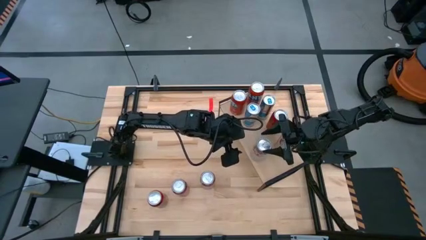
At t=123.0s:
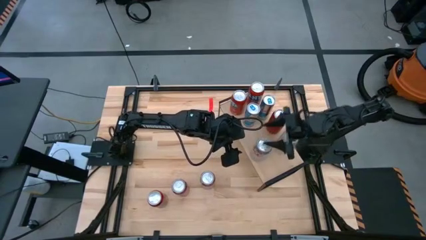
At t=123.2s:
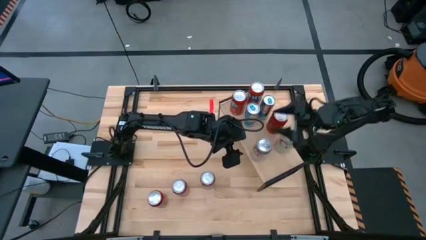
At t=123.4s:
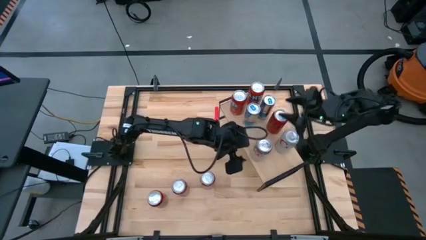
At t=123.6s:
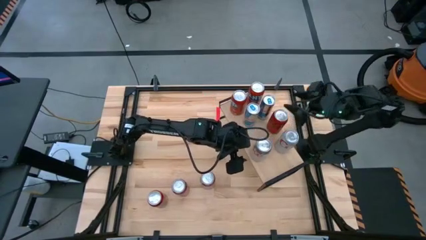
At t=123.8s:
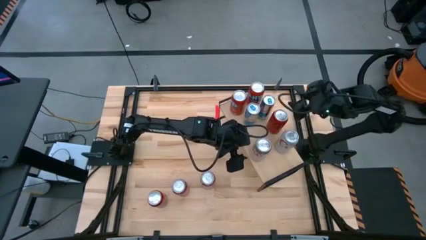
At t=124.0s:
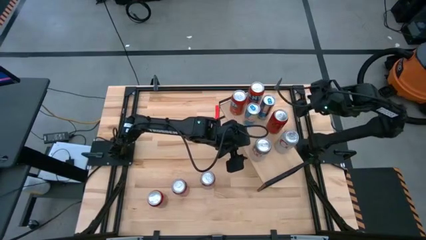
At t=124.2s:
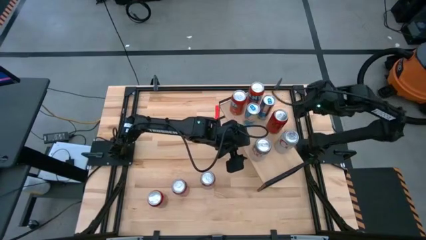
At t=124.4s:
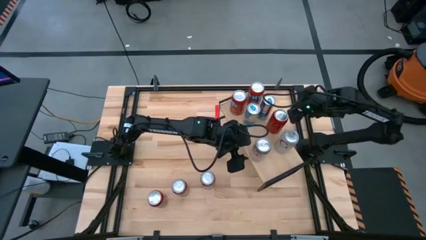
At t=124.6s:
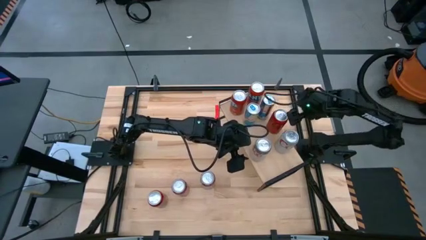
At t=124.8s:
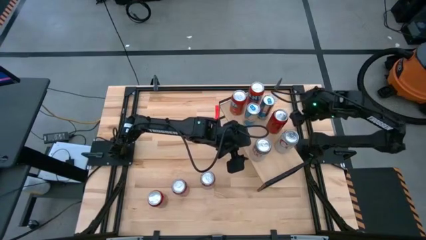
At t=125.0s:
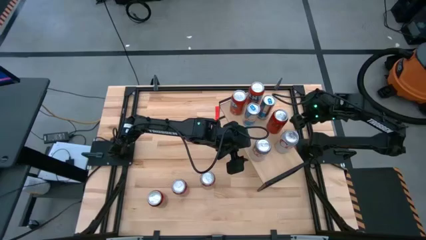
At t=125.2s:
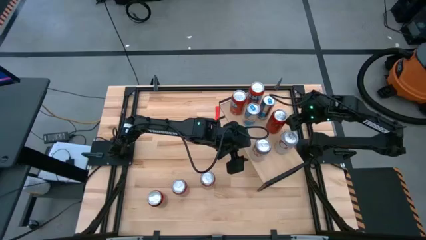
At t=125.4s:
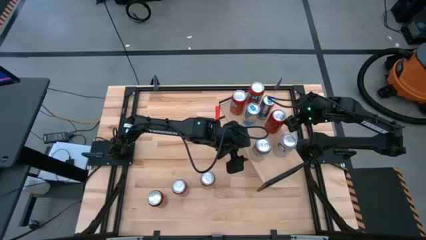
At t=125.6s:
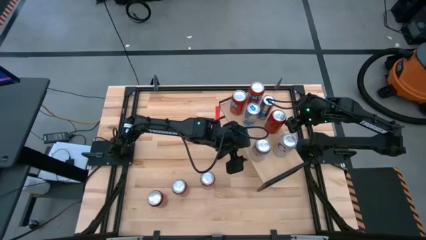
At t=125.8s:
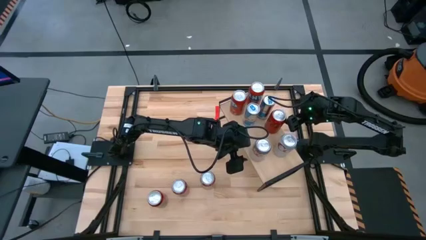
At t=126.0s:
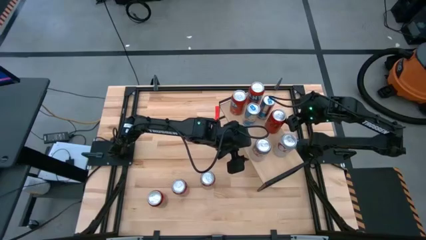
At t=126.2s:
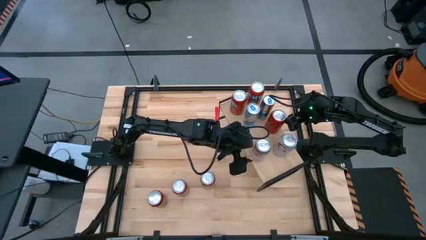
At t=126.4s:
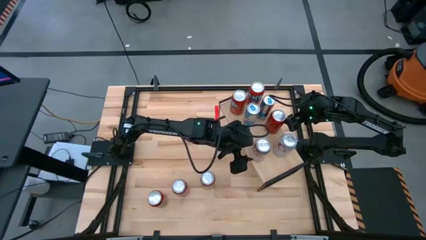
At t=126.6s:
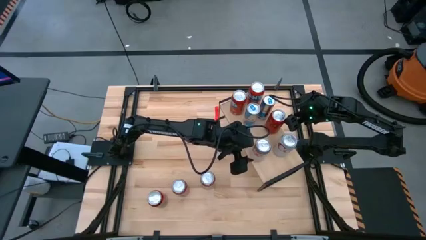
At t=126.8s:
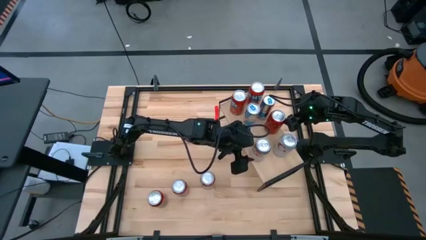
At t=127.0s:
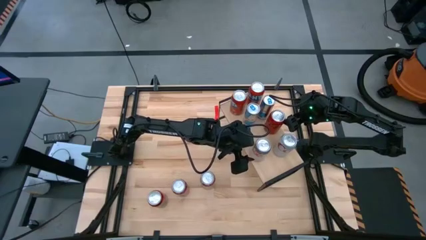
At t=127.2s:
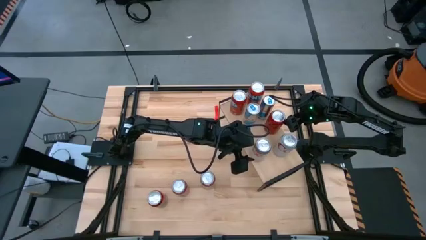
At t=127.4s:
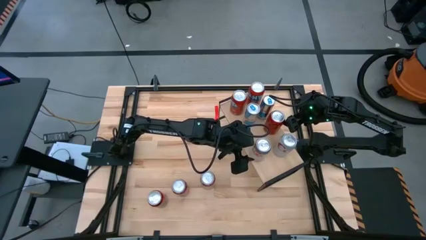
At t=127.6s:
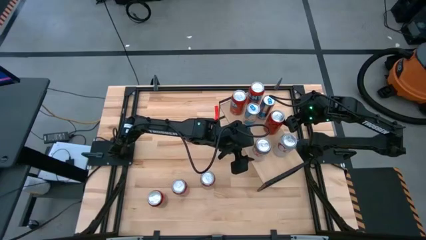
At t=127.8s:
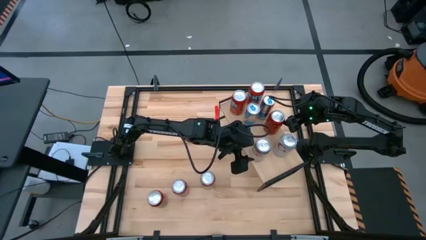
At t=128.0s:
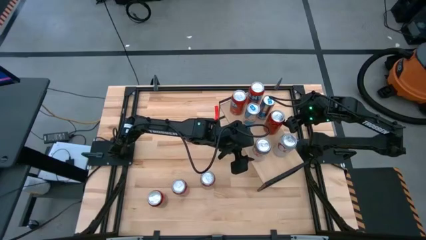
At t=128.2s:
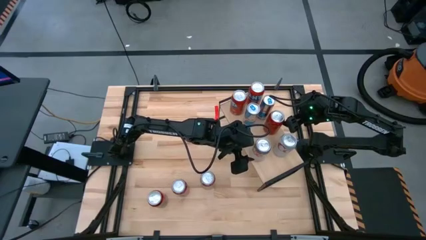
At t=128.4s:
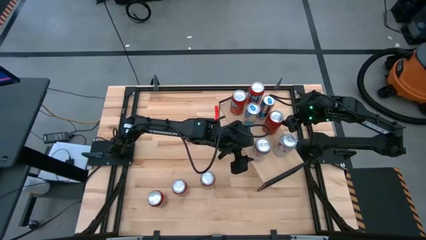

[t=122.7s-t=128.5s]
Task: Place canned beverage on shelf
Adjust the dark red soda

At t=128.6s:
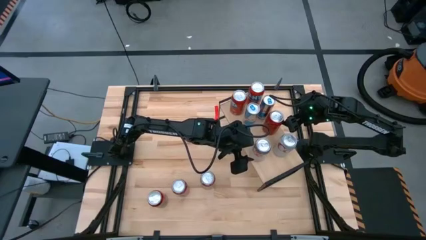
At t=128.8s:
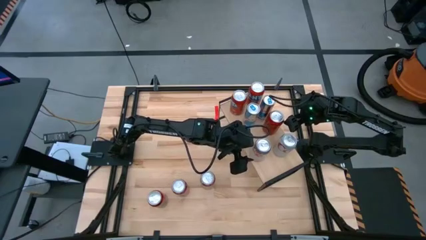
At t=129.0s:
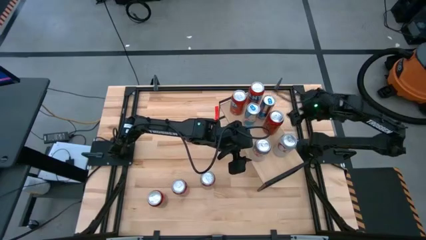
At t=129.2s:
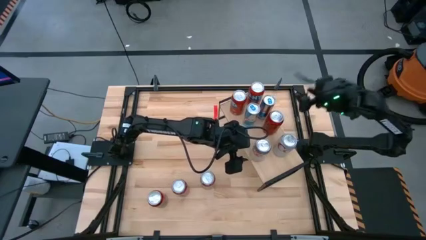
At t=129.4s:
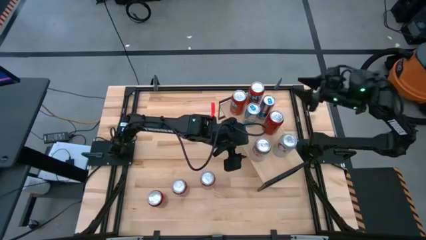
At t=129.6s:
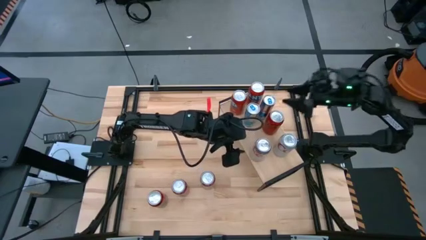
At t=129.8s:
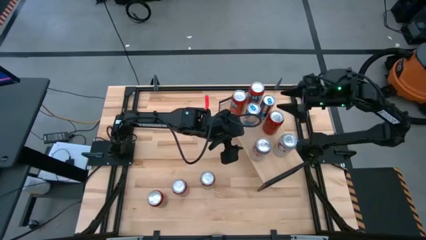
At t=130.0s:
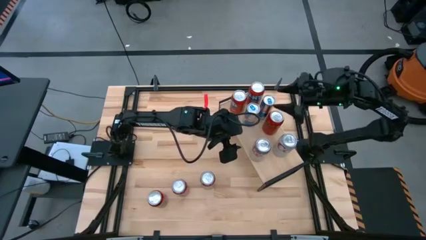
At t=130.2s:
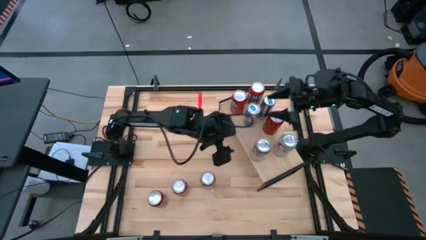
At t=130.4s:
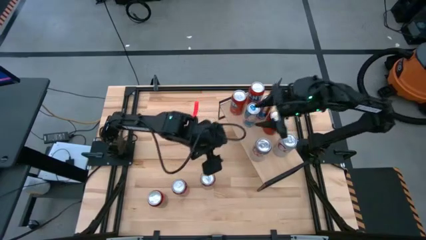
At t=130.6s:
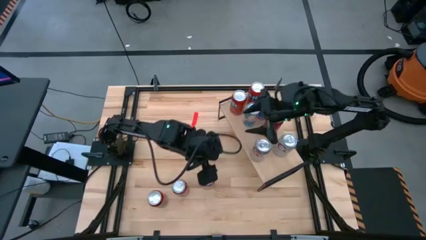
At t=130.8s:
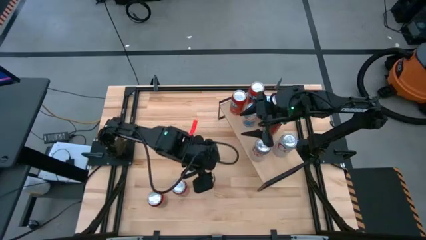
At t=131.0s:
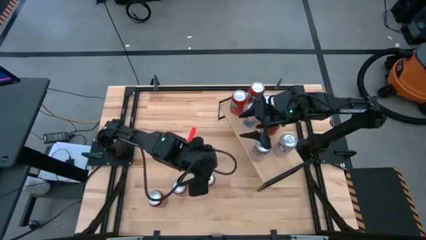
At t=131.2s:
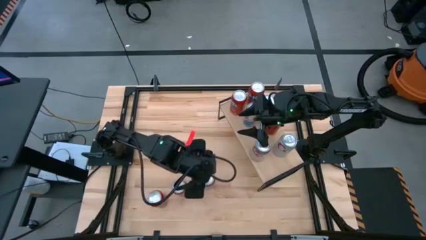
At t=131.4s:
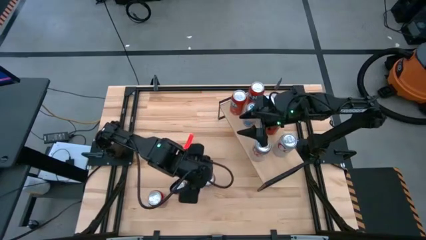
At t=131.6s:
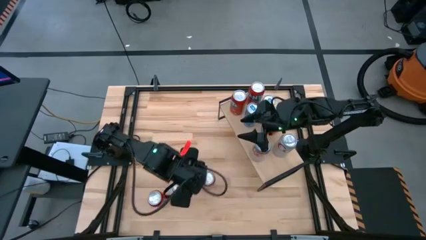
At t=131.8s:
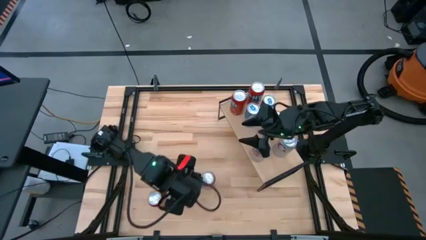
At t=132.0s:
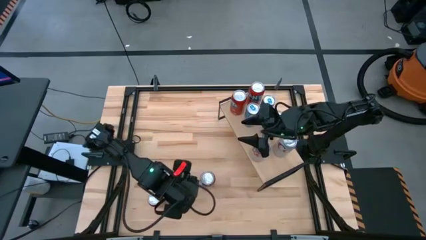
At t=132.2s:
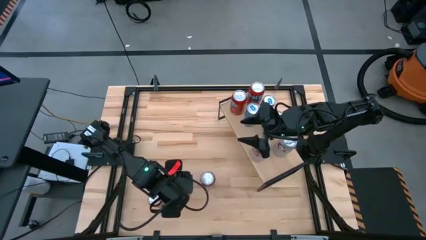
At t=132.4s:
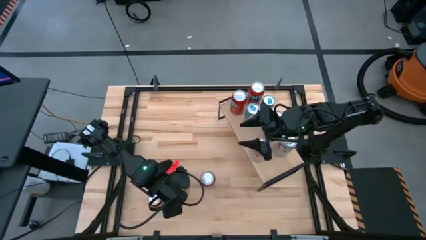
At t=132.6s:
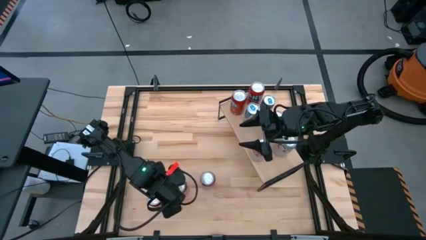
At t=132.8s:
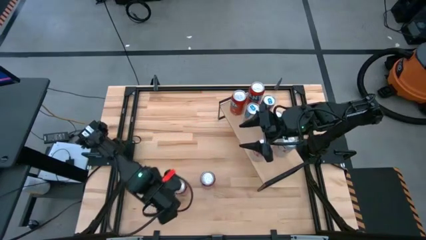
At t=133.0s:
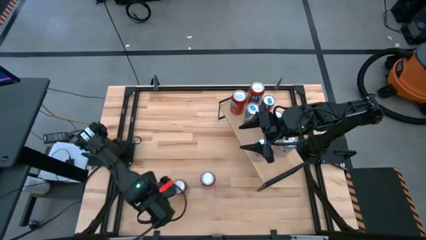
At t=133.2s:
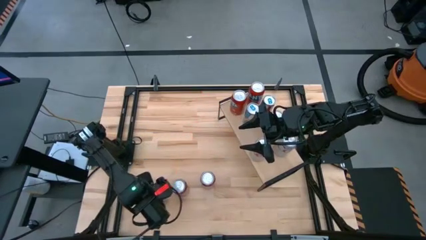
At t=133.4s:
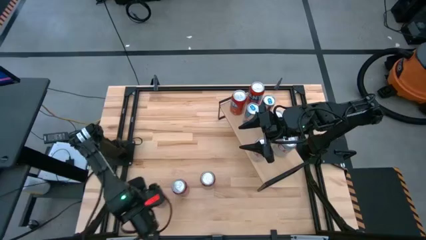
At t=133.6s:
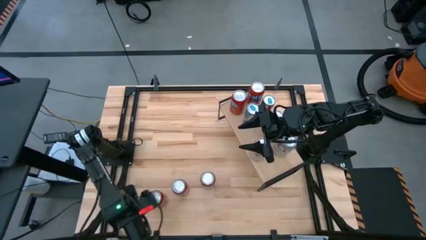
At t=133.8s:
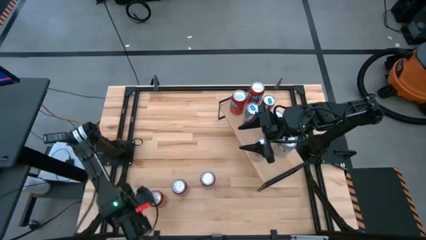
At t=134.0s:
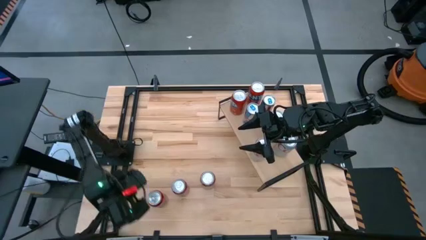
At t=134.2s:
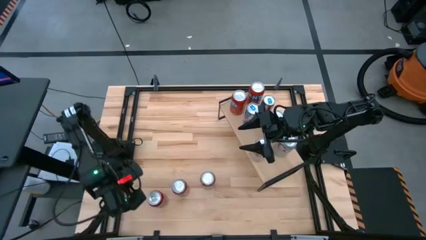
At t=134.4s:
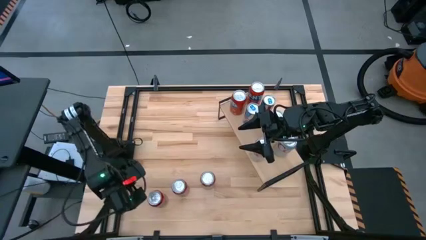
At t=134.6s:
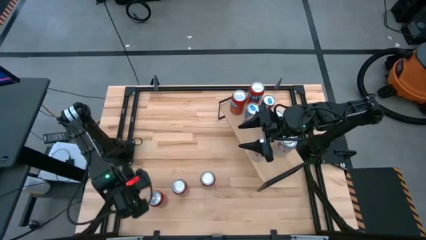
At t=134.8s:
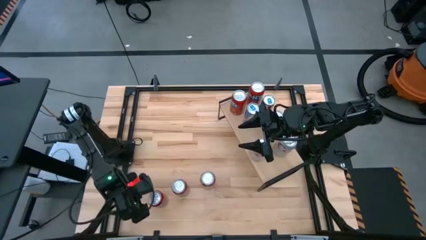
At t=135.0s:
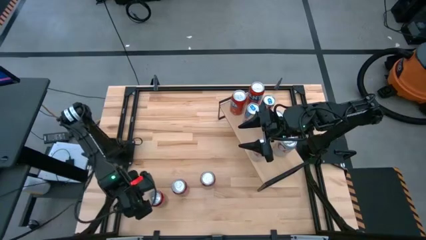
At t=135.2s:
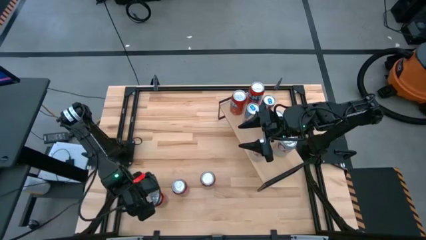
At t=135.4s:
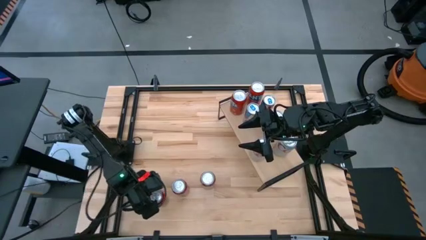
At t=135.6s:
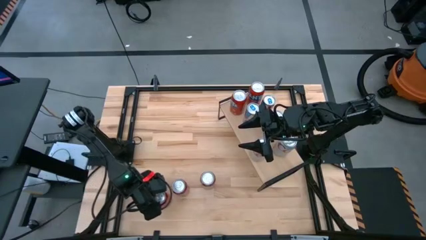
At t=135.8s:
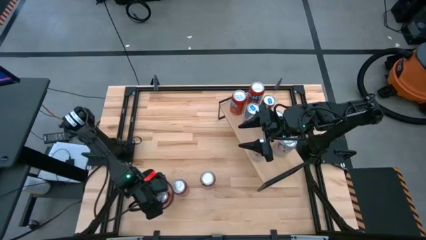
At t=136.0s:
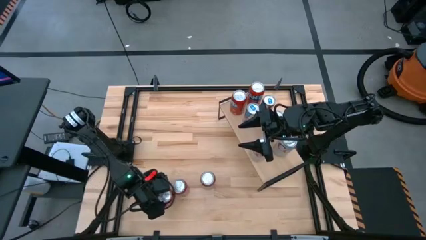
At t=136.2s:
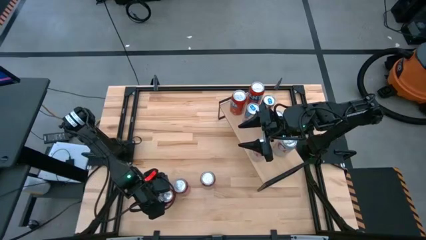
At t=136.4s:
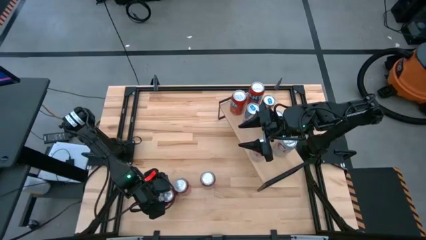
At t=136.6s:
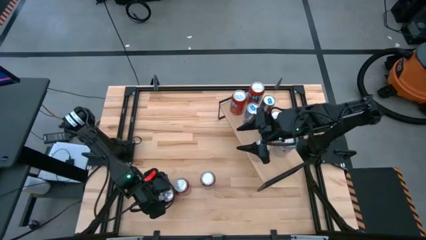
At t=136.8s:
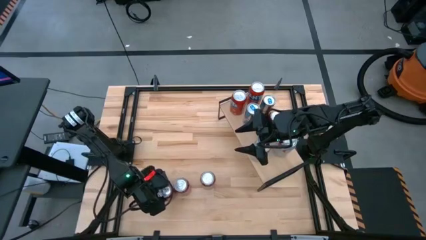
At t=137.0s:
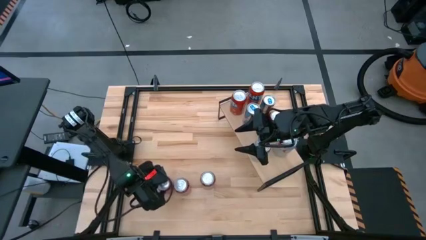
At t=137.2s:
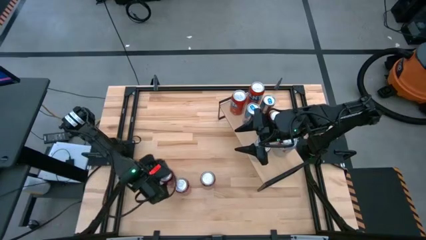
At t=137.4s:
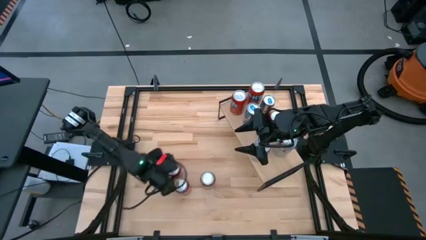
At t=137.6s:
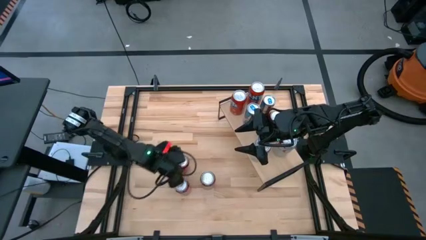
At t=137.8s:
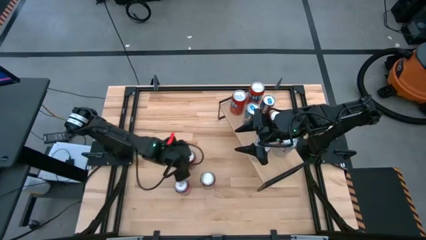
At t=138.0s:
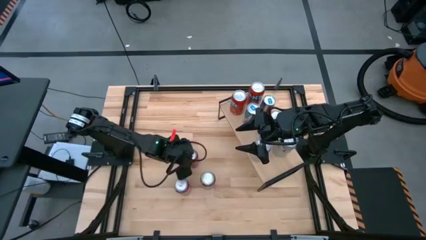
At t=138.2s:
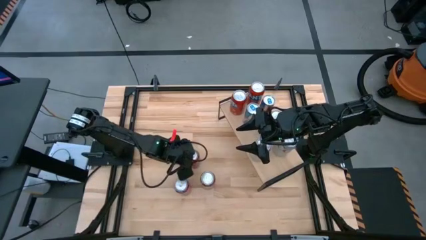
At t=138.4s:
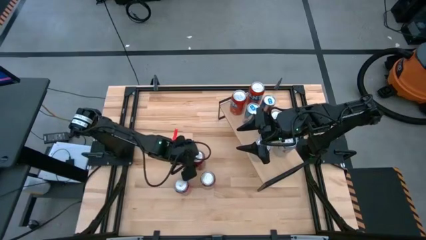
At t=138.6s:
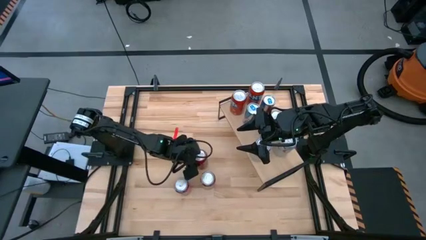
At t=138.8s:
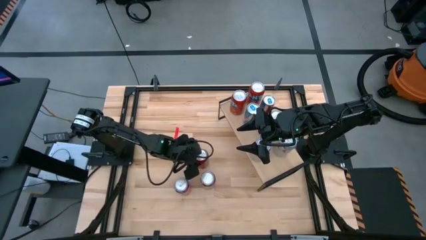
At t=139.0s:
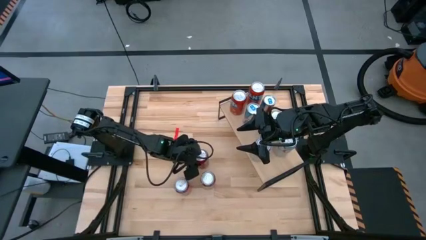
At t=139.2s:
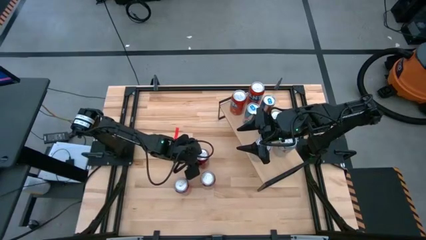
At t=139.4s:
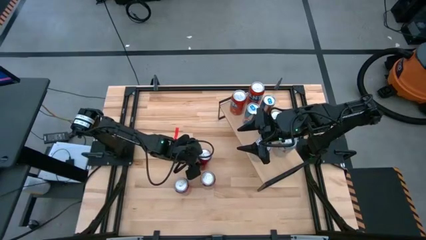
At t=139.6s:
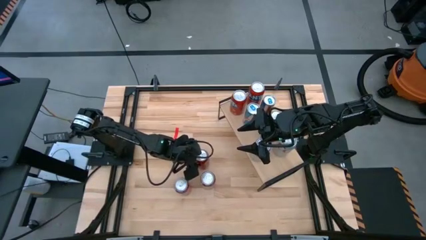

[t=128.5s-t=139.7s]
Put the dark red soda can aligned with the other dark red soda can on the shelf
